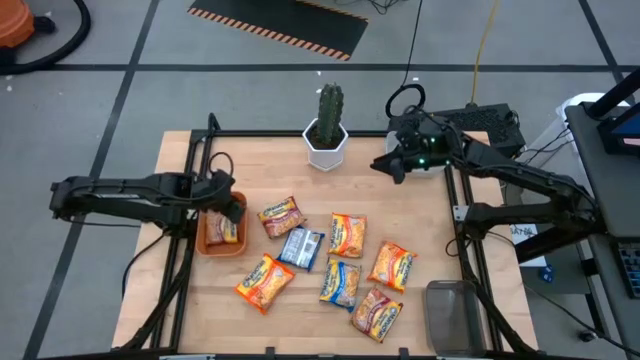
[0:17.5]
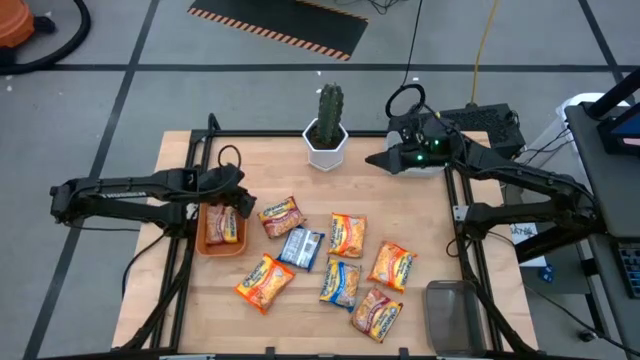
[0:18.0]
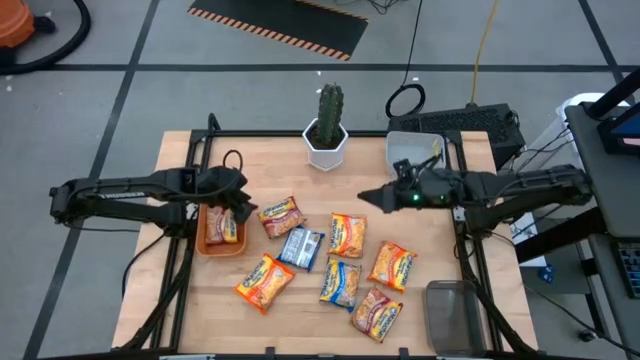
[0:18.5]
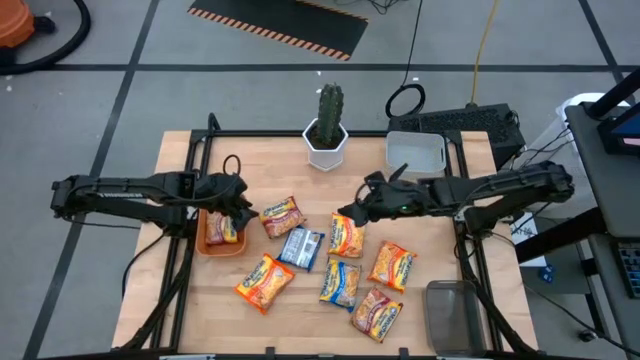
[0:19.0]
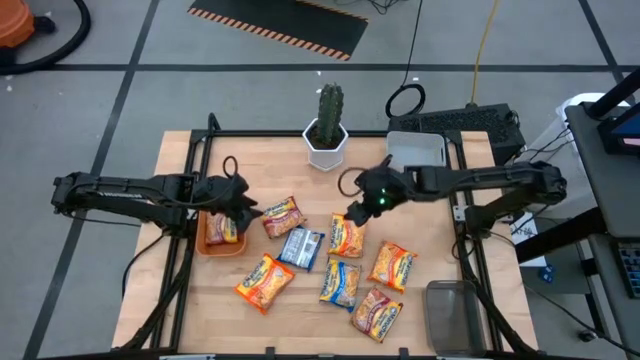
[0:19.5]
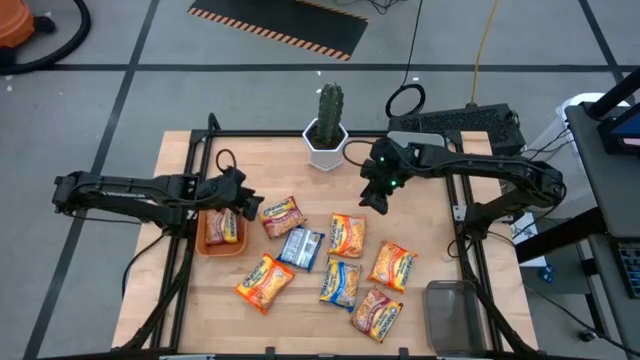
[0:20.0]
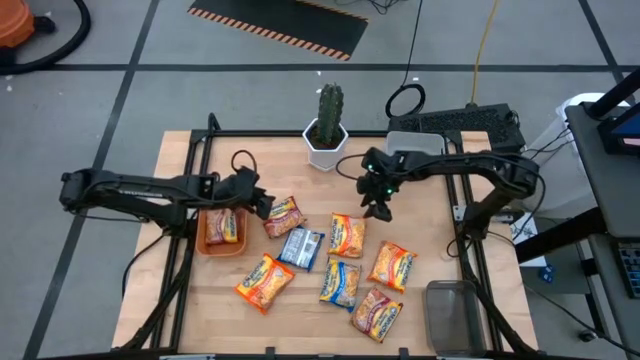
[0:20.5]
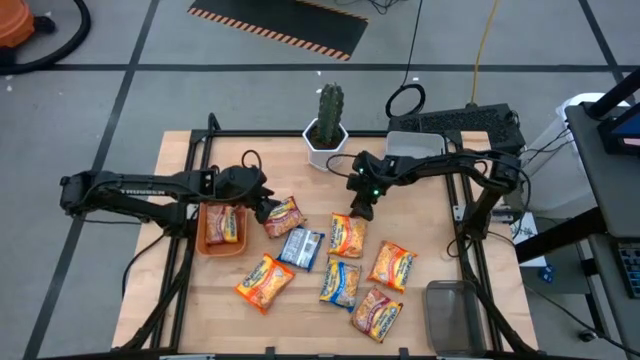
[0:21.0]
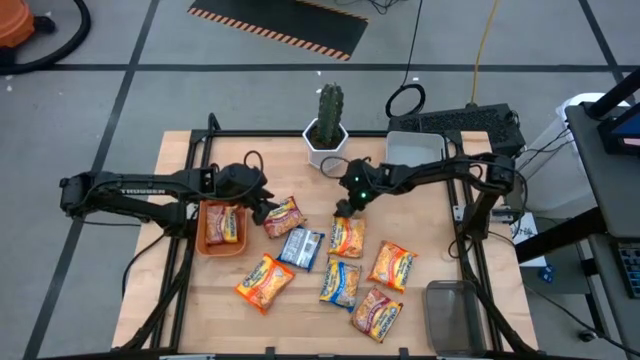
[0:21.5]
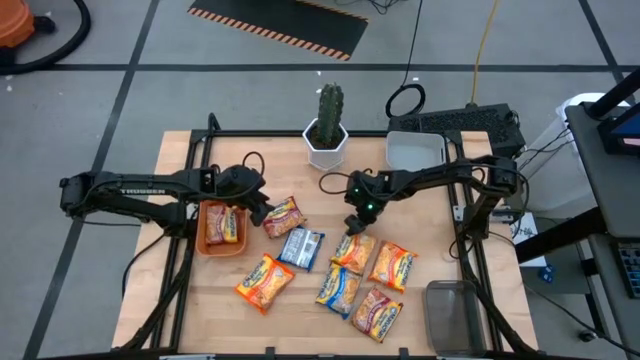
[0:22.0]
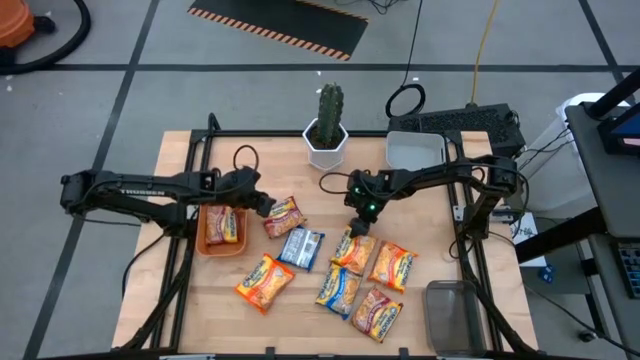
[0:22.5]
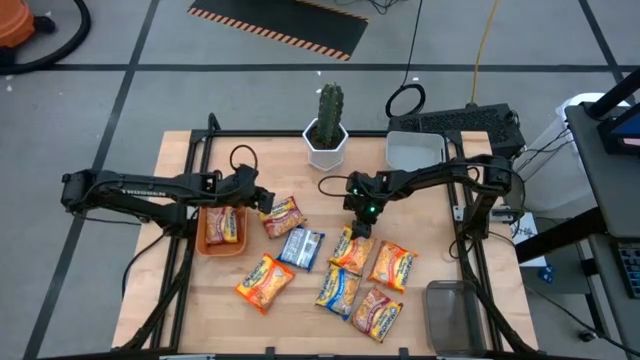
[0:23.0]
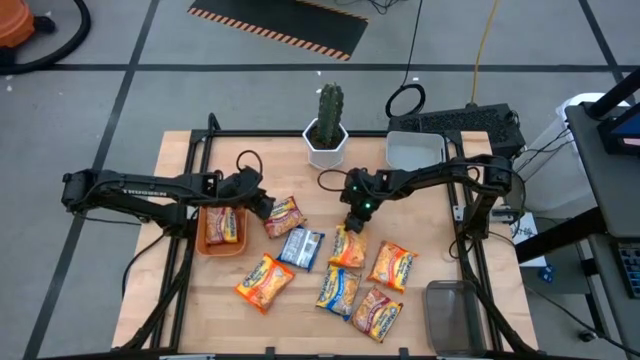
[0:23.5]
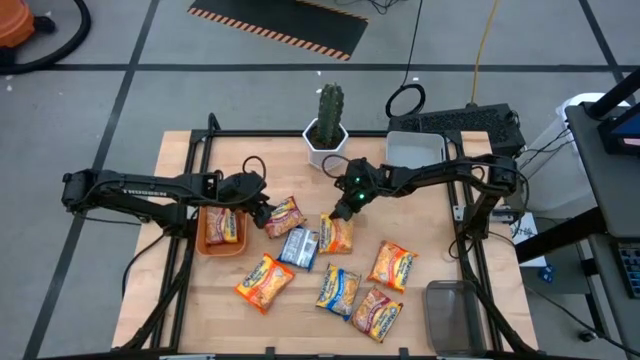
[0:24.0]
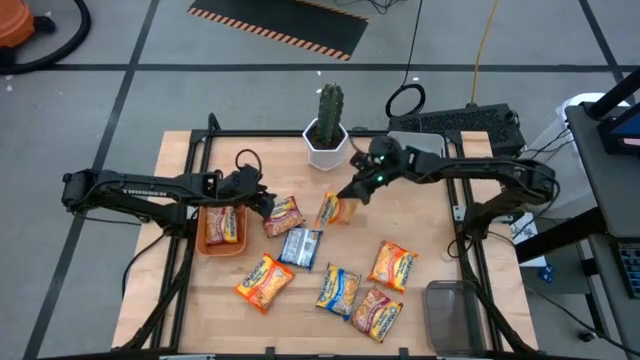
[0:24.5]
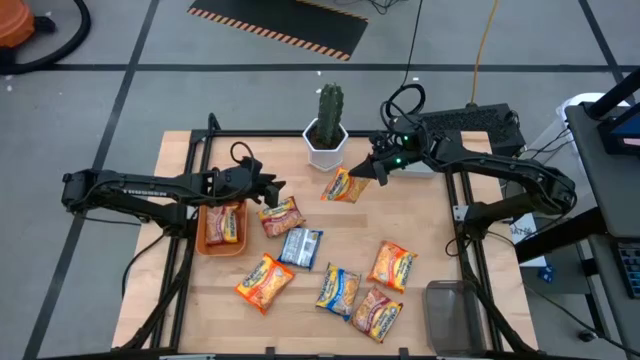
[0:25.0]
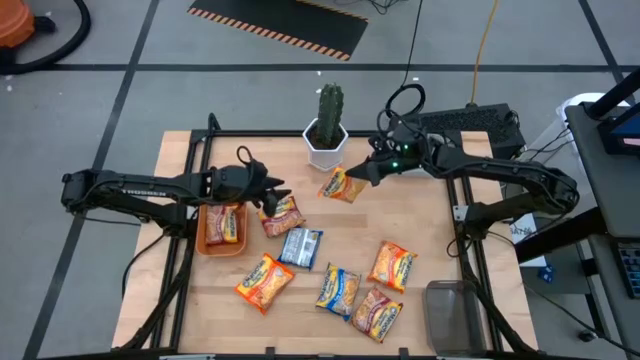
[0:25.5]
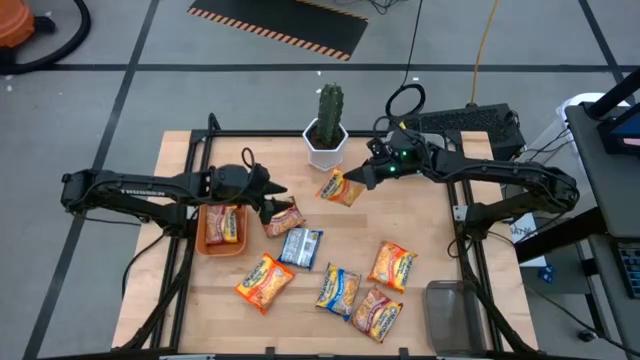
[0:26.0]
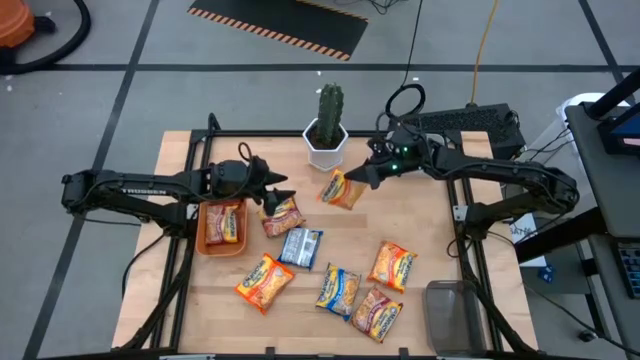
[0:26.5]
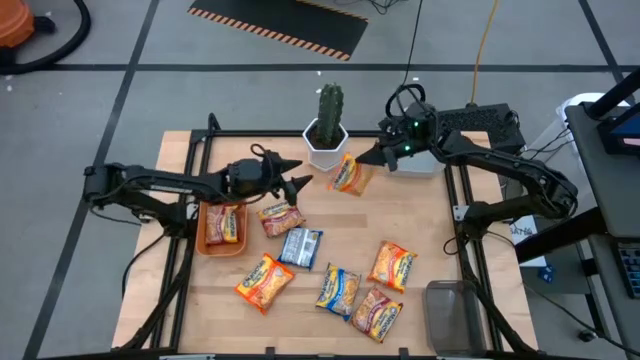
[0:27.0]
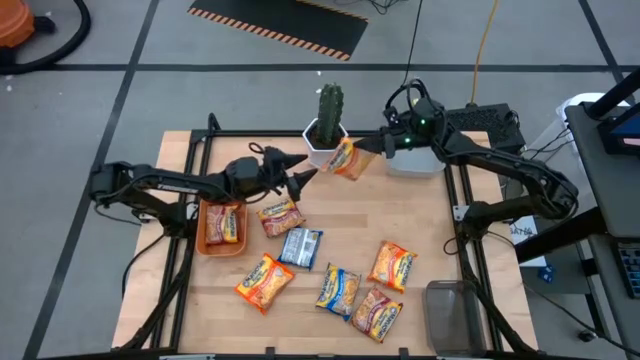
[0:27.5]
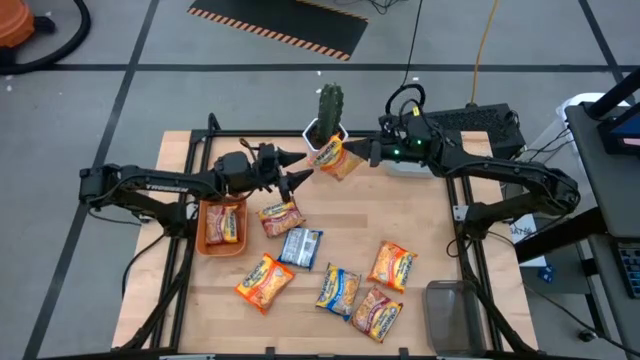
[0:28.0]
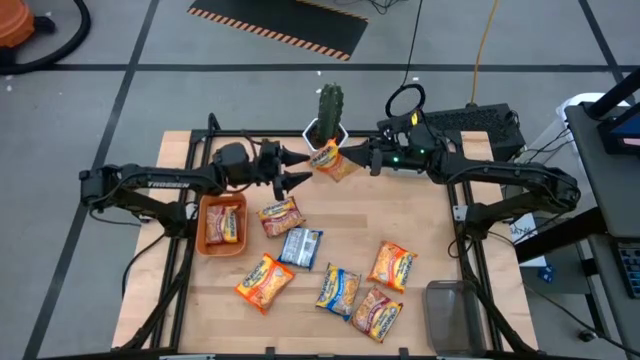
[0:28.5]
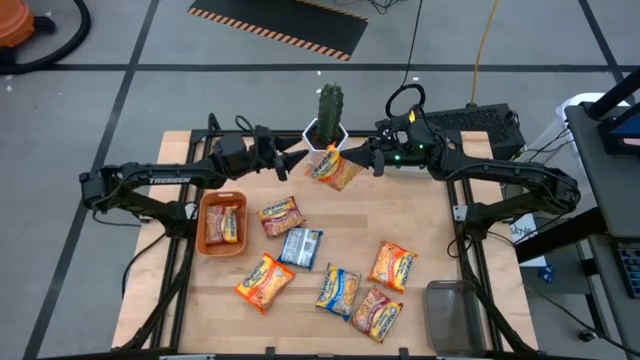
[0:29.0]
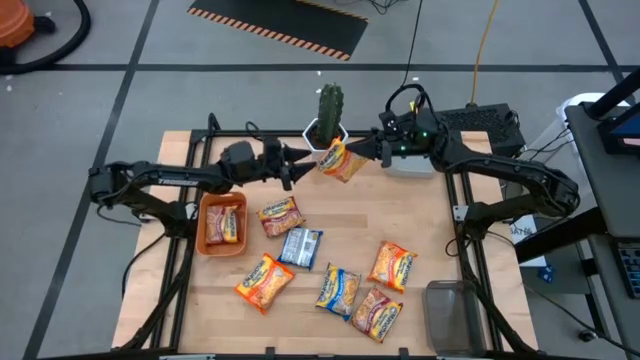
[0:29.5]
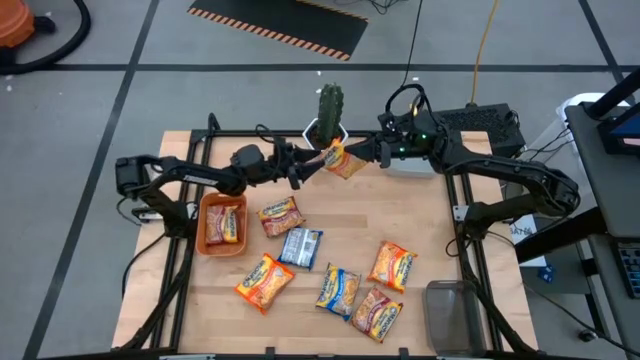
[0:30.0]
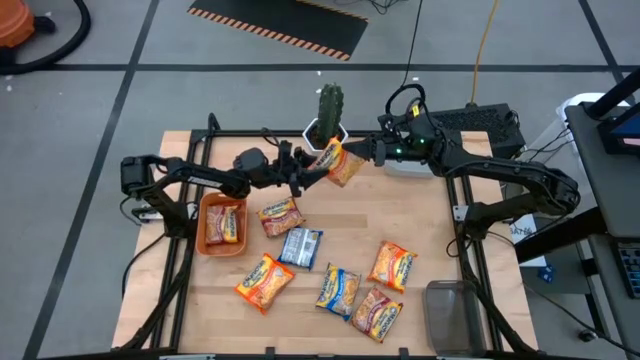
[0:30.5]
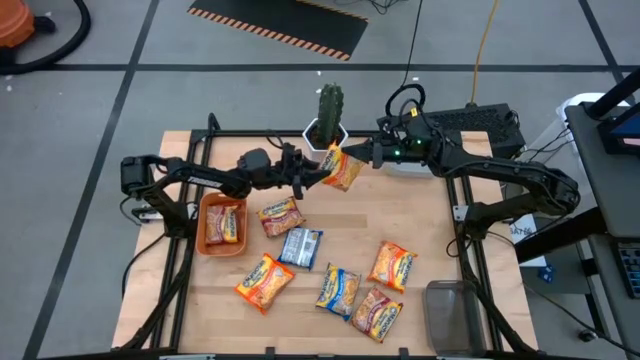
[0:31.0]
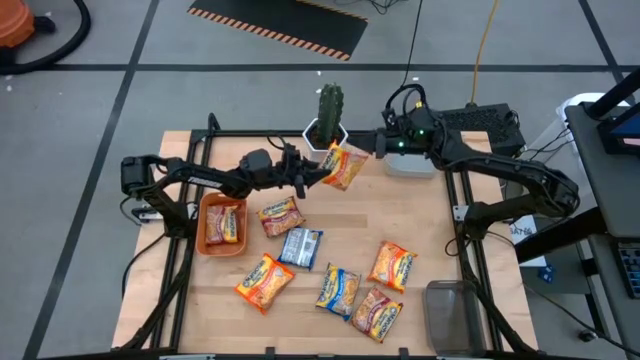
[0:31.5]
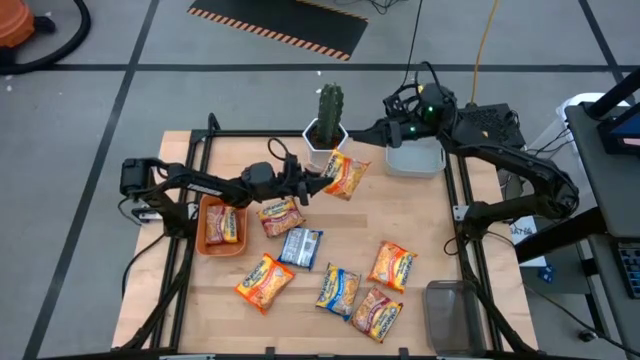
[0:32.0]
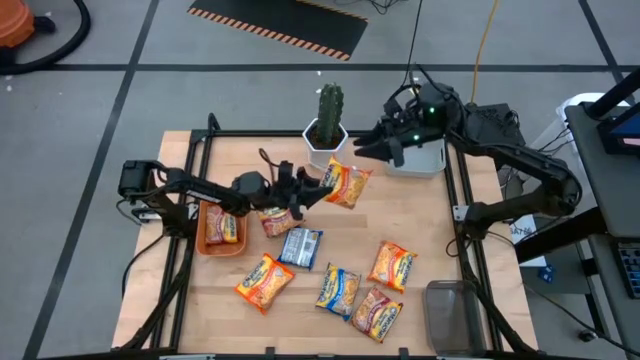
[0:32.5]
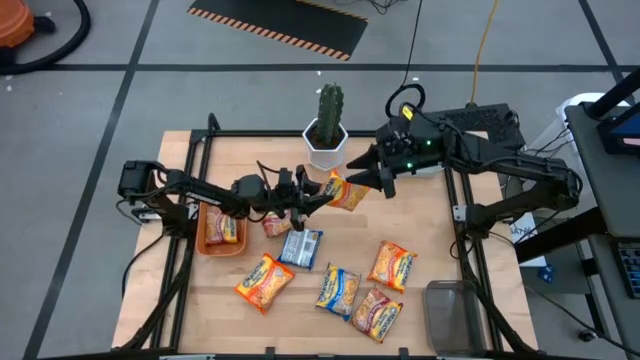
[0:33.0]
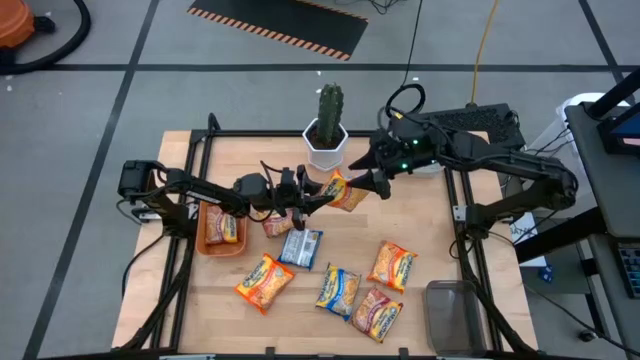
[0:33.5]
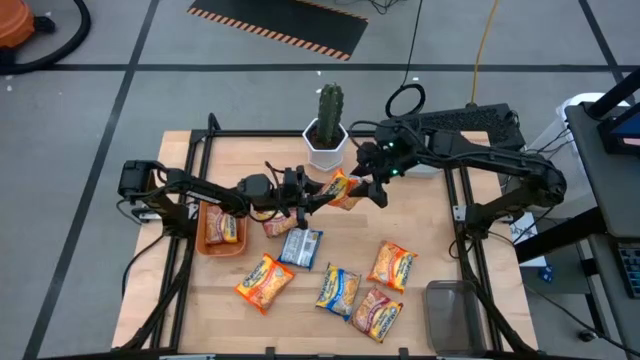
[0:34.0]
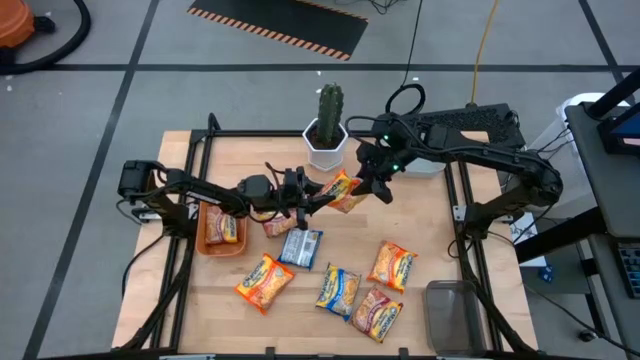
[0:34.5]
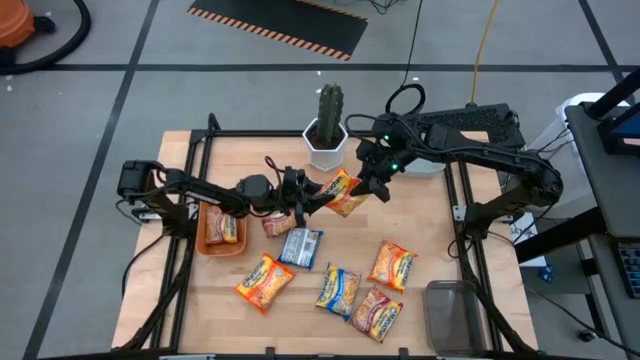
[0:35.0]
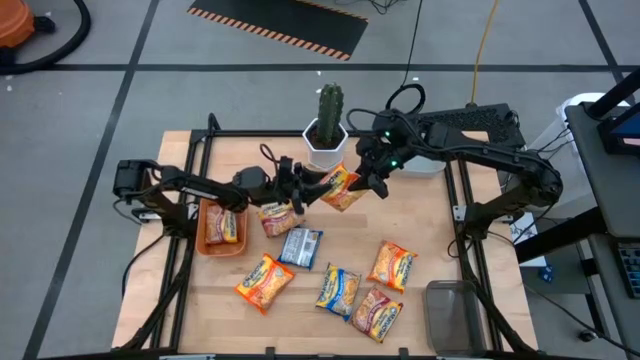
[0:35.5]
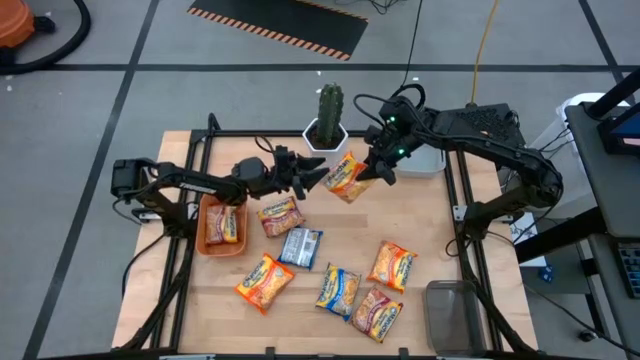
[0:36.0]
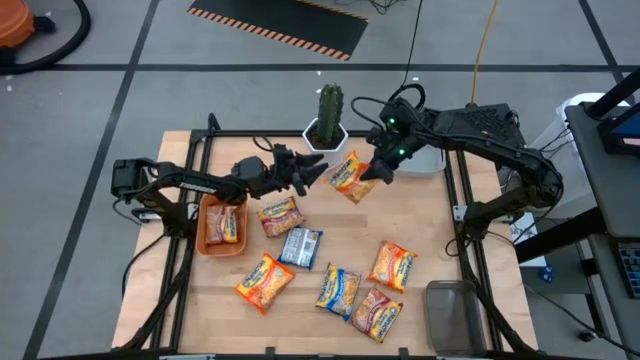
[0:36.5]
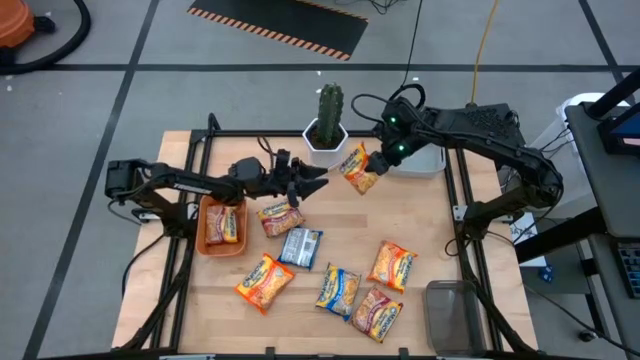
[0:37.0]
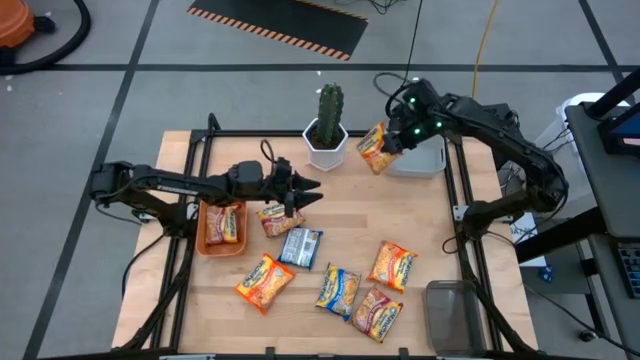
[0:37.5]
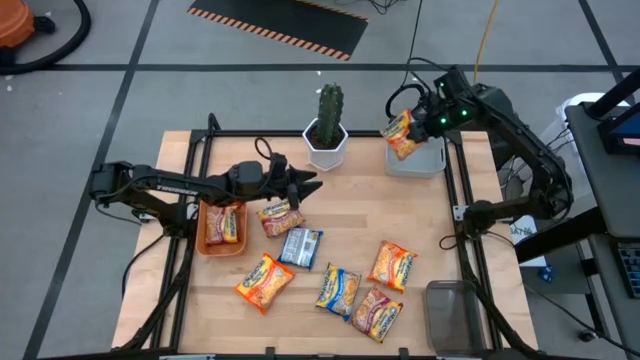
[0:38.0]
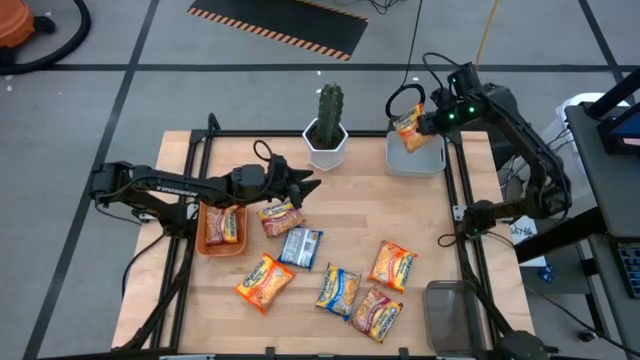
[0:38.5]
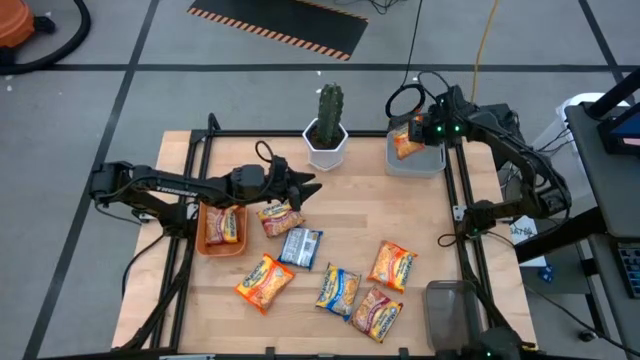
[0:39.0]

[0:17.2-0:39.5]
Task: Sort Maruchan noodles
Put the middle orange noodle pack into the gray bin
